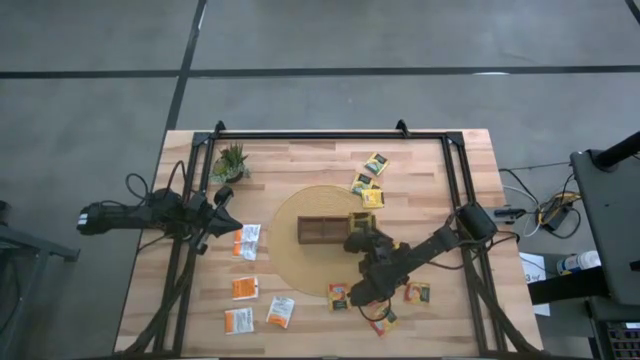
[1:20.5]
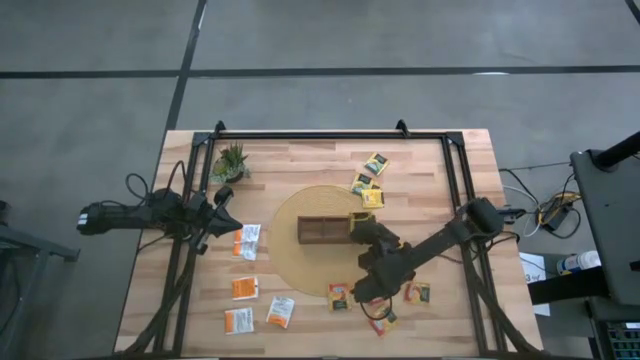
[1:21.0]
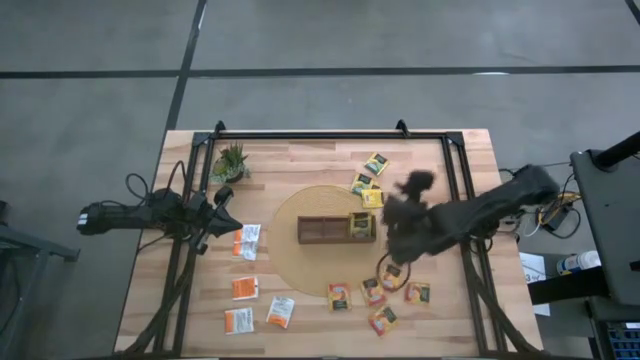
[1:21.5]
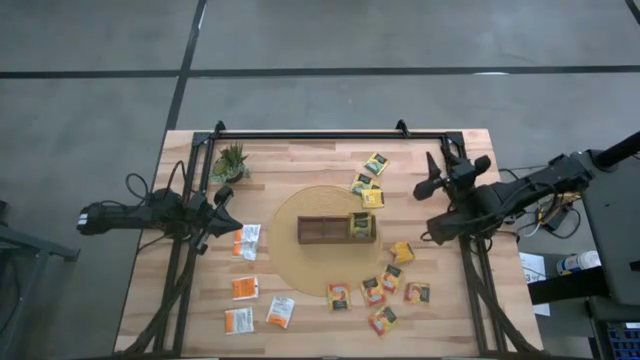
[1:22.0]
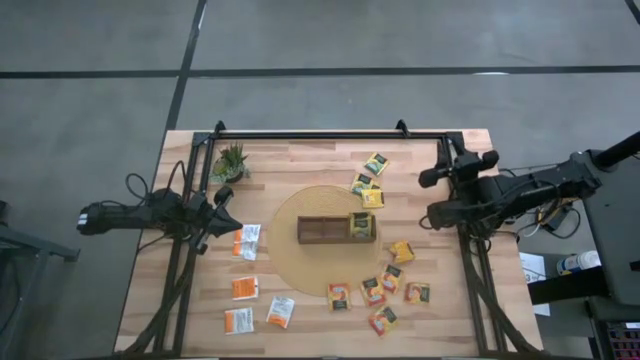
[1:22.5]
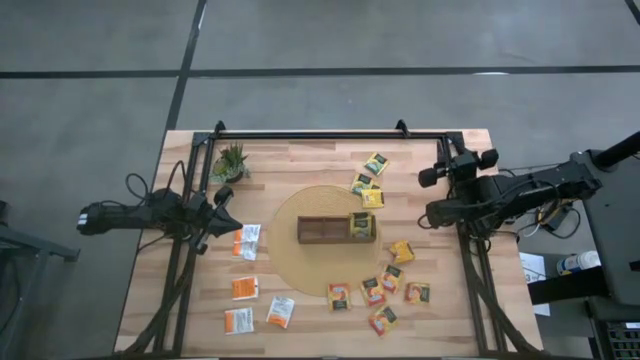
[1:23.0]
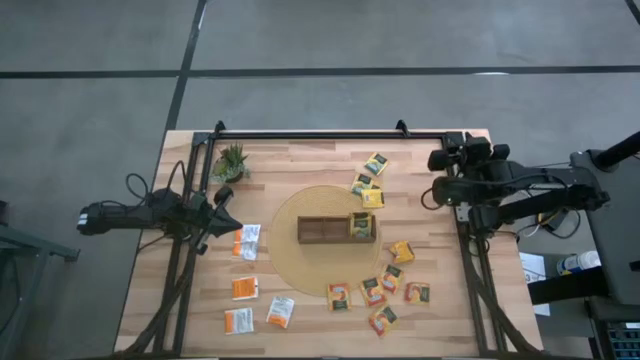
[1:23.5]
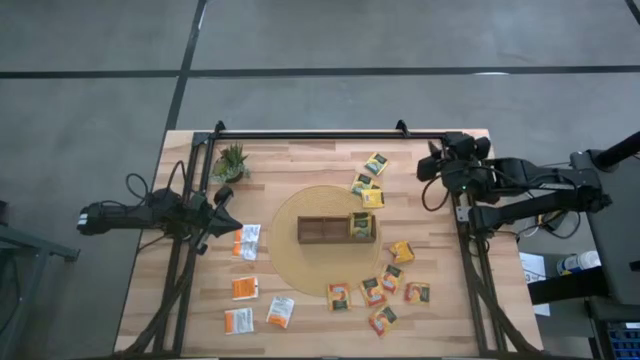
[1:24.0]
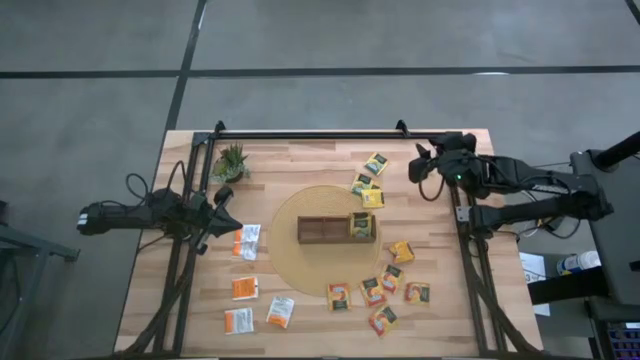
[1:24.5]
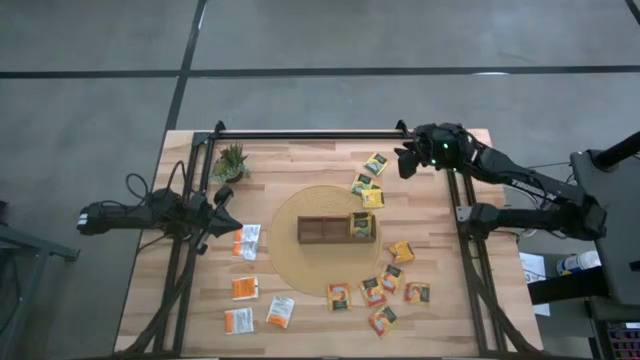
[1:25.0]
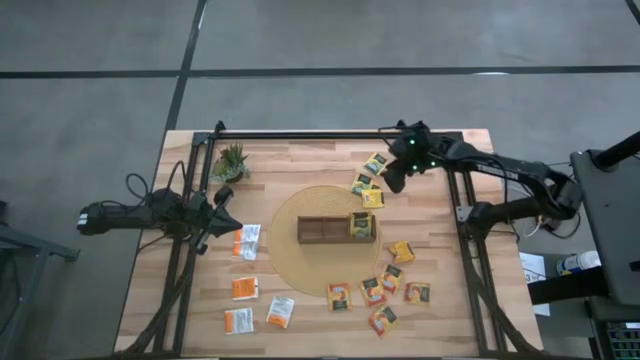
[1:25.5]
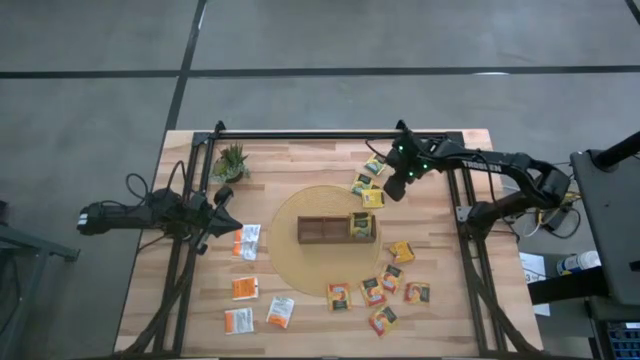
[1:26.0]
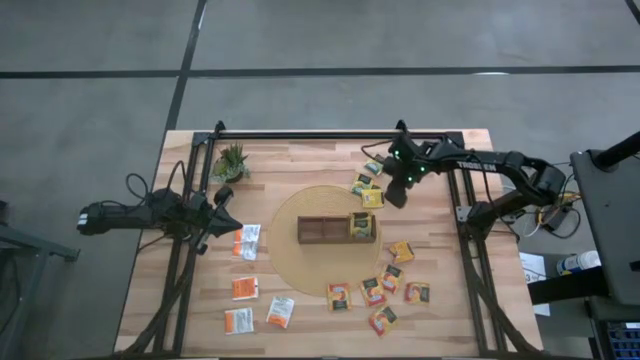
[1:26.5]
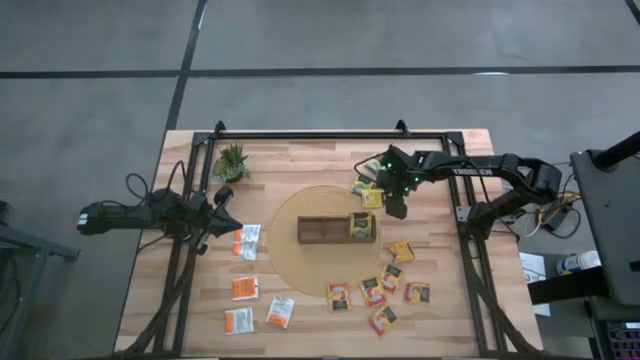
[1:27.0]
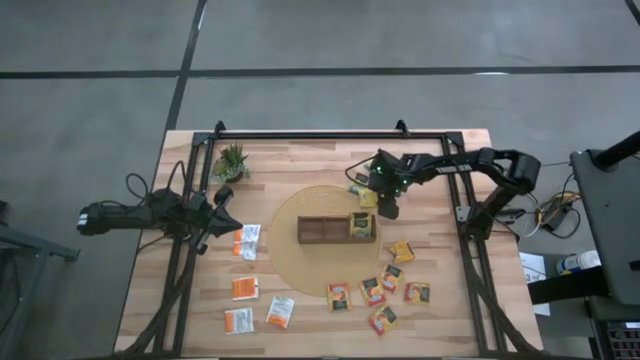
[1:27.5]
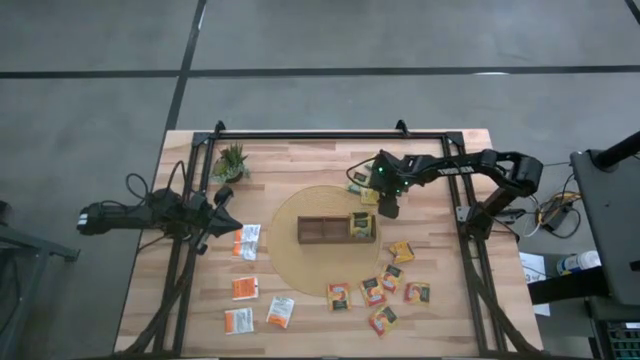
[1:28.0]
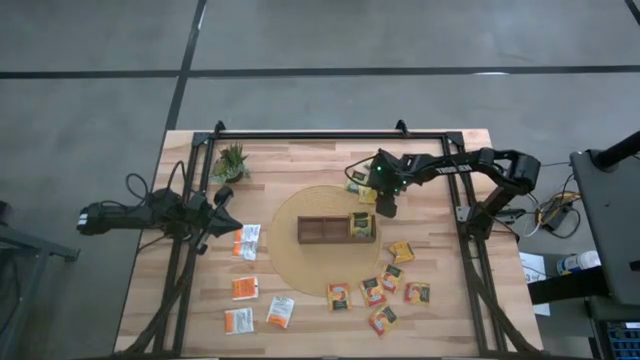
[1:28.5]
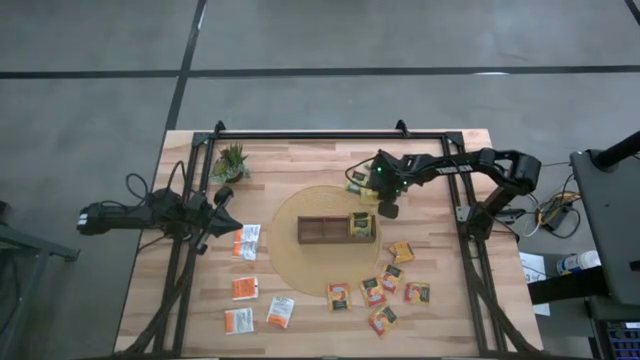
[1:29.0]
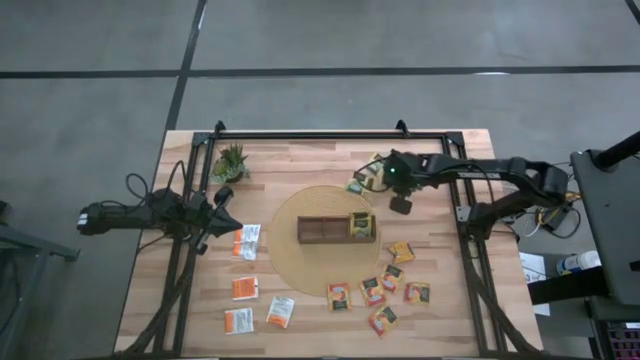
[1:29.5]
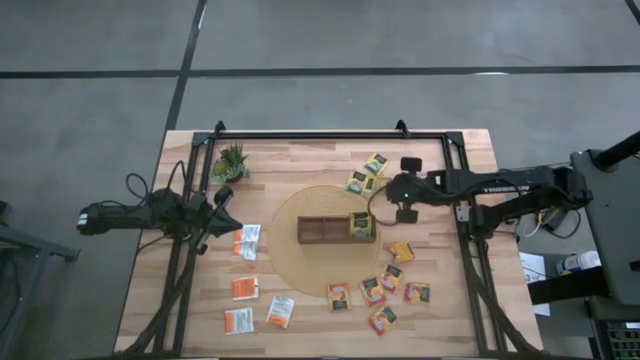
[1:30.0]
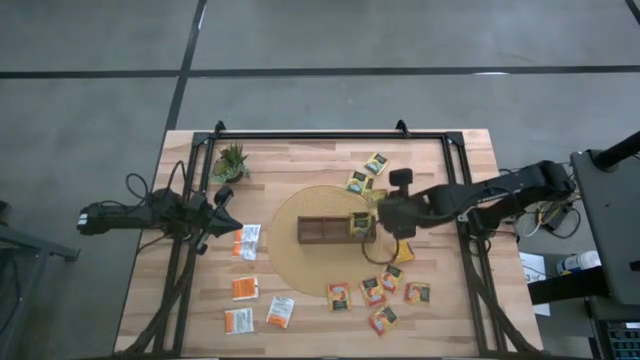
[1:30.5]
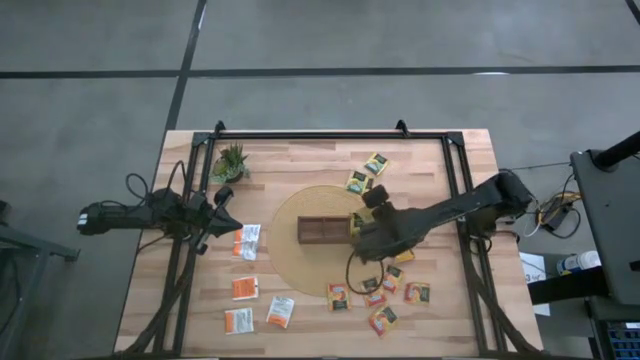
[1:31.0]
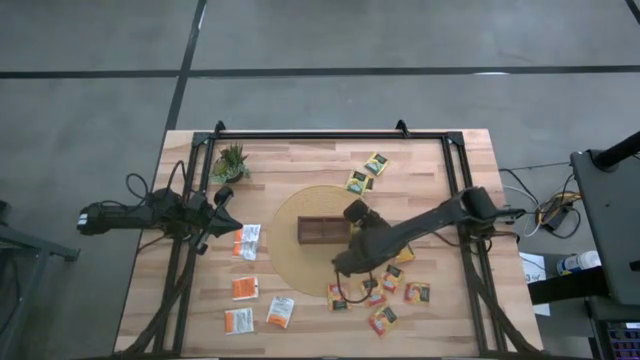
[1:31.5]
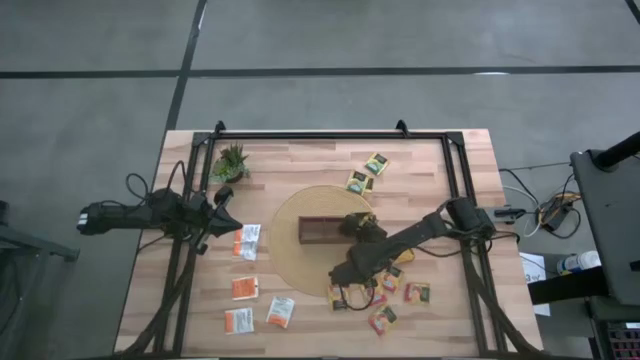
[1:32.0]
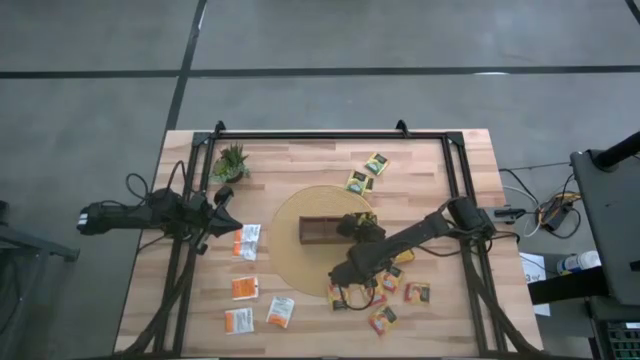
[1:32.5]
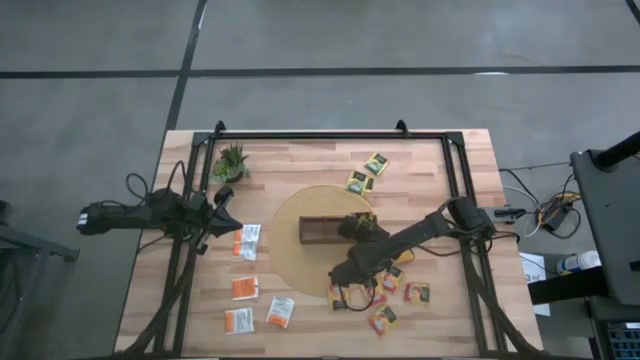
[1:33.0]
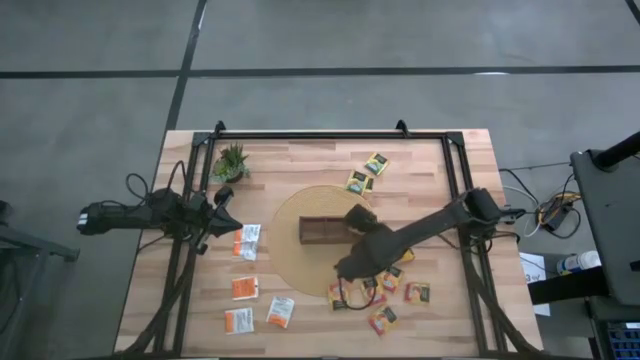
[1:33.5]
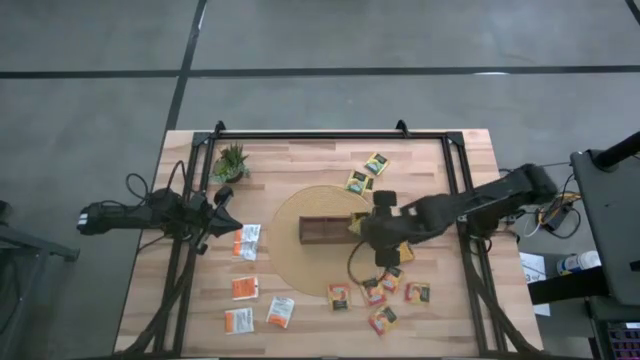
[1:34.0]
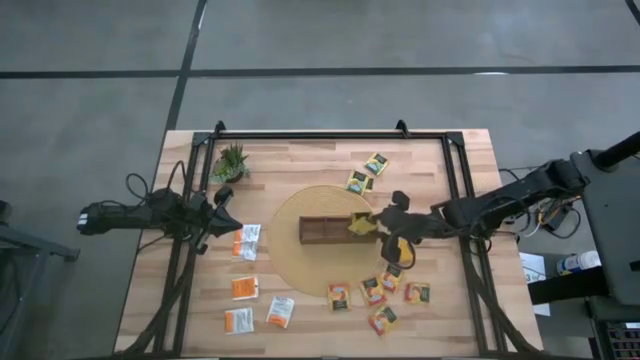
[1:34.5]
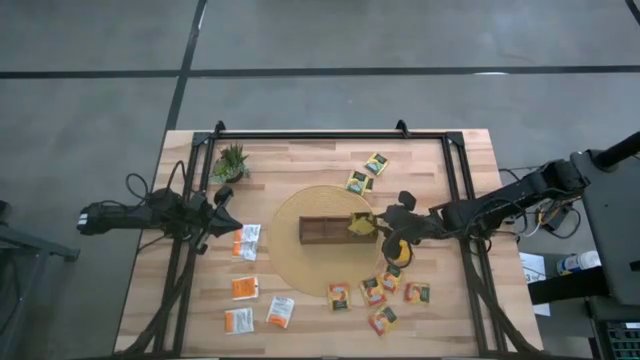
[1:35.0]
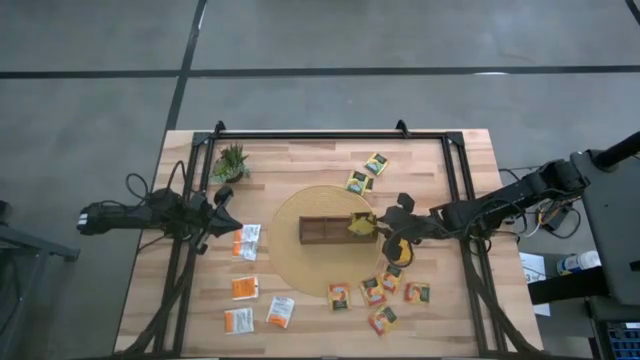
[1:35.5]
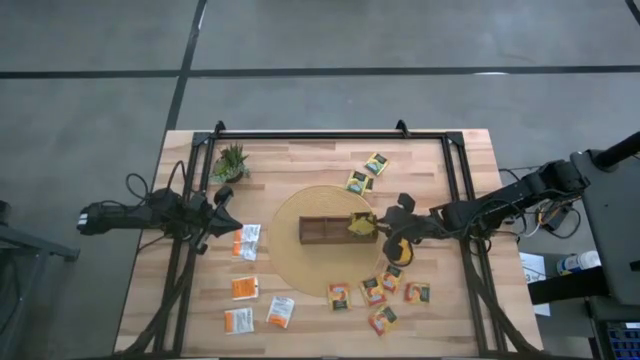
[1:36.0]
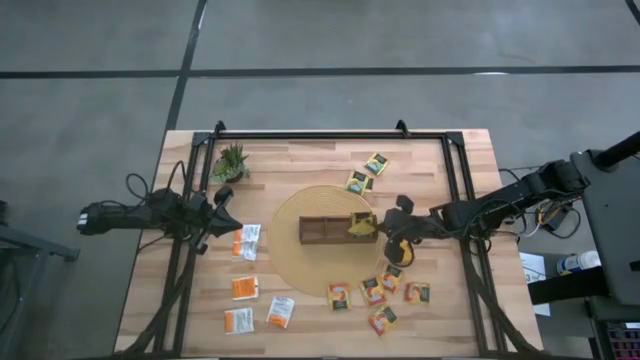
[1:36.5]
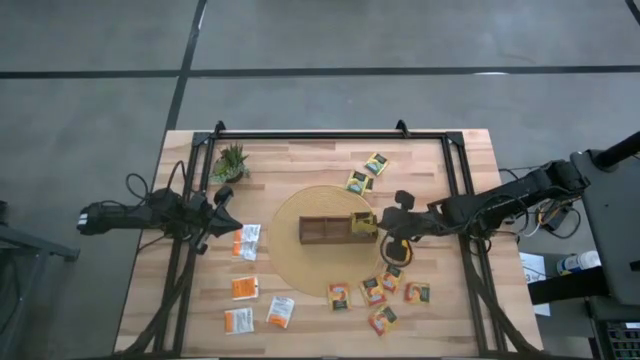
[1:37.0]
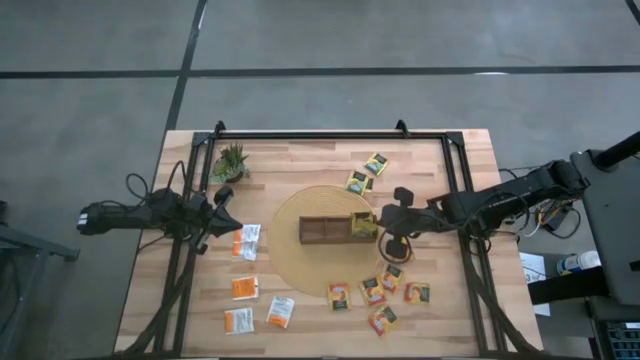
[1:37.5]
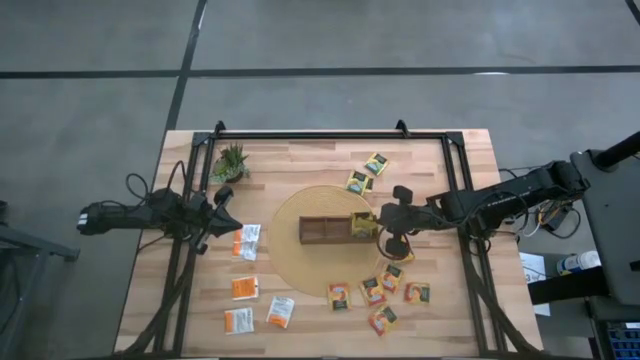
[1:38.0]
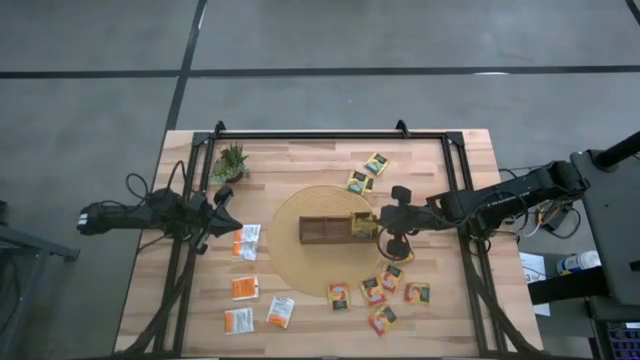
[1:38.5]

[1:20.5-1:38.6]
Task: Pick & Place Tea
Put the yellow tea bag into the right of the wooden organizer

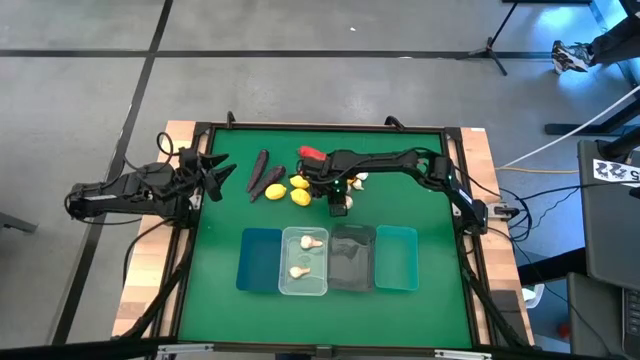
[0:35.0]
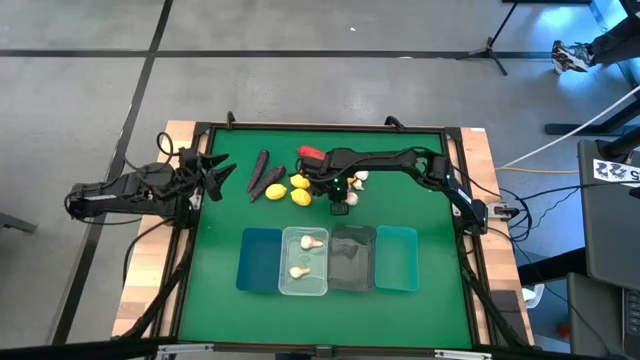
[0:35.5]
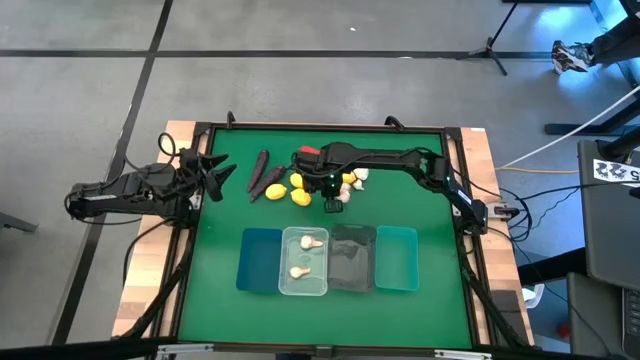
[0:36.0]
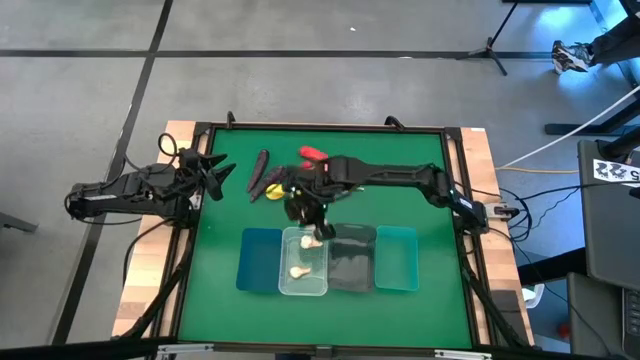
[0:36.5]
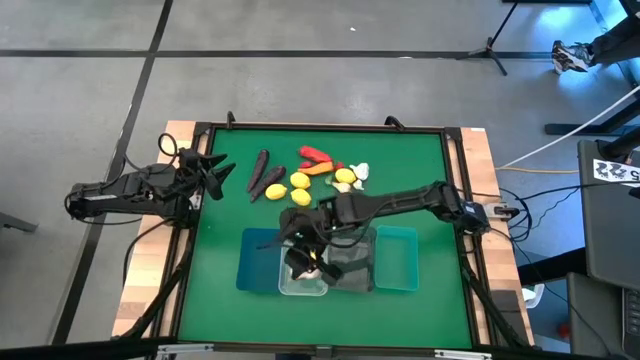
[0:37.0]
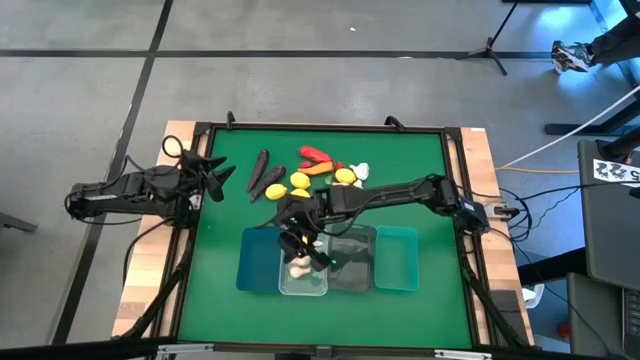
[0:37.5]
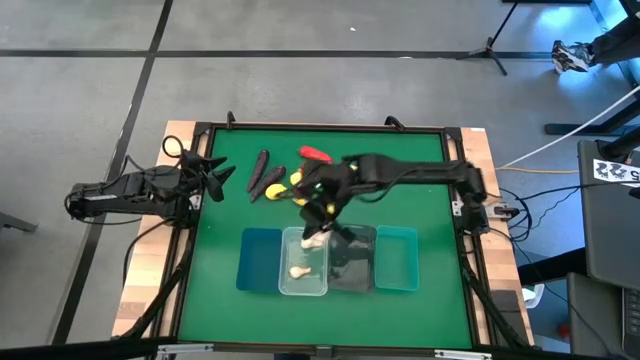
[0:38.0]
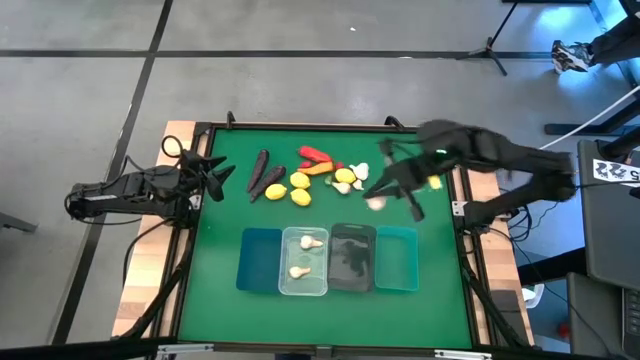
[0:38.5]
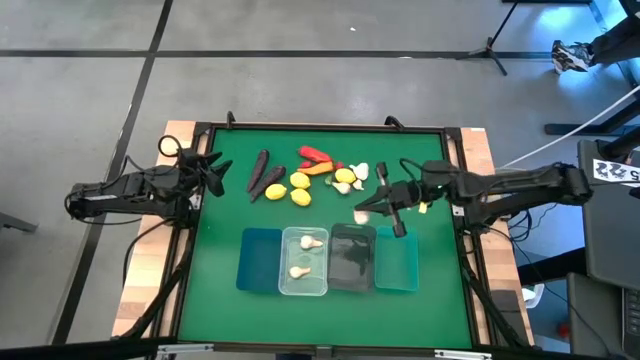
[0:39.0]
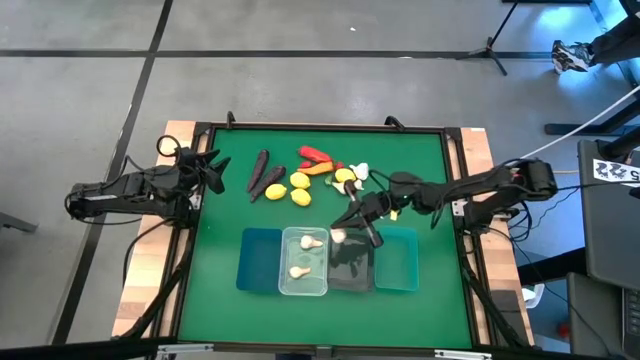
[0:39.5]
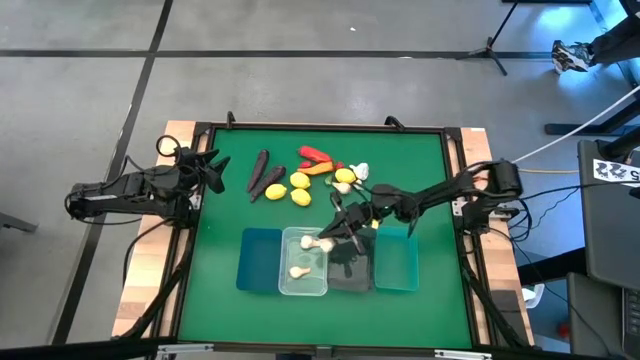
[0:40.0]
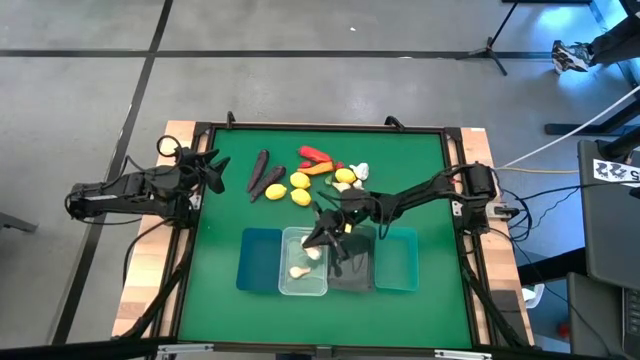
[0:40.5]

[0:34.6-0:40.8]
Task: Sort produce into baskets
Put the white garlic into the transparent bin
